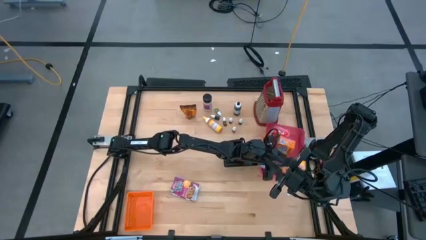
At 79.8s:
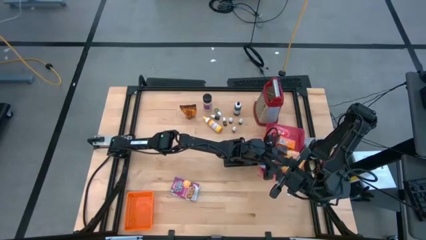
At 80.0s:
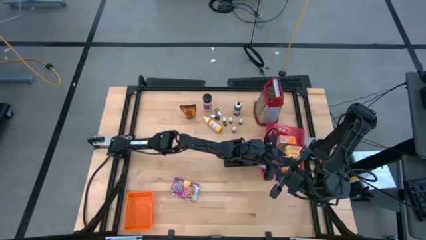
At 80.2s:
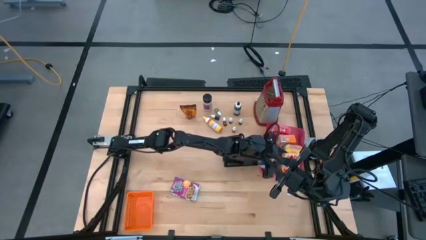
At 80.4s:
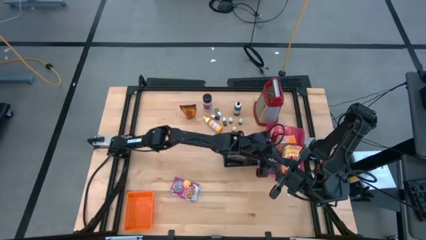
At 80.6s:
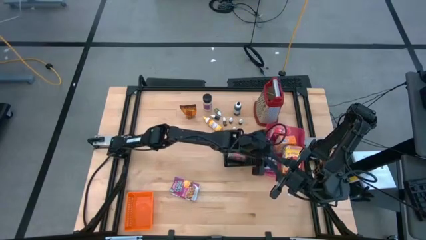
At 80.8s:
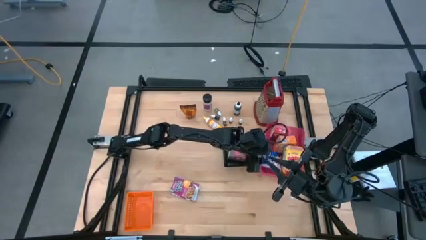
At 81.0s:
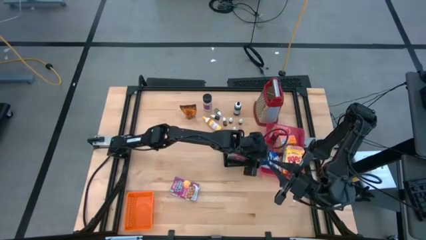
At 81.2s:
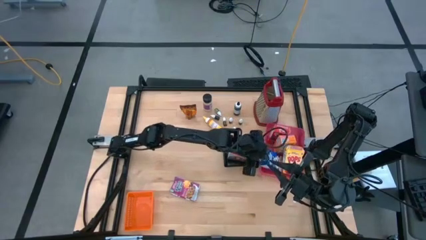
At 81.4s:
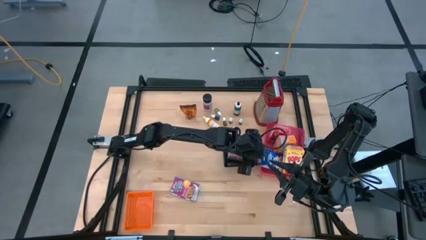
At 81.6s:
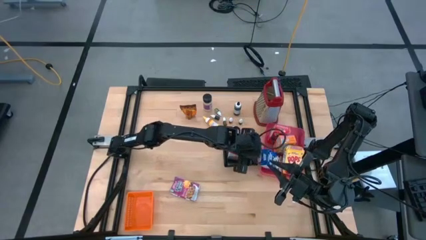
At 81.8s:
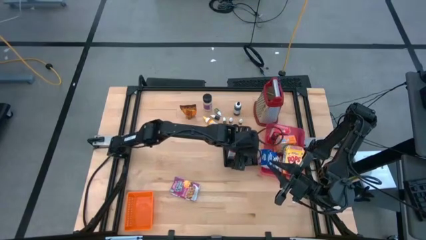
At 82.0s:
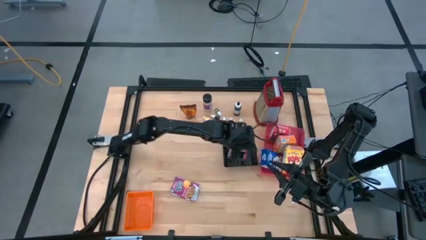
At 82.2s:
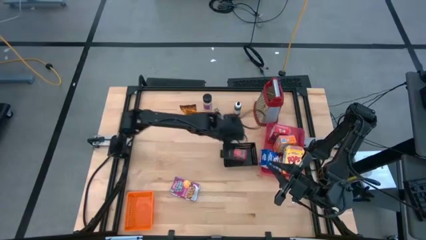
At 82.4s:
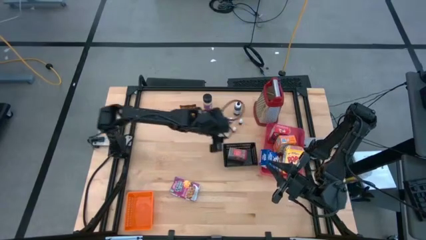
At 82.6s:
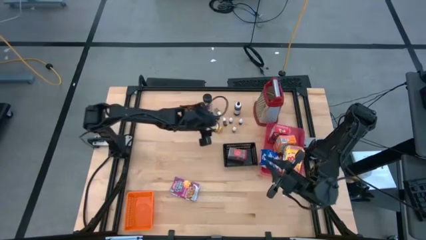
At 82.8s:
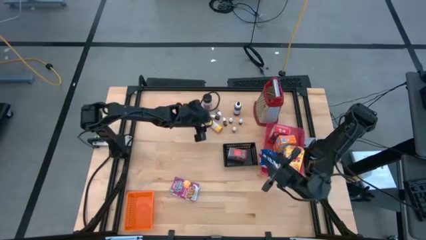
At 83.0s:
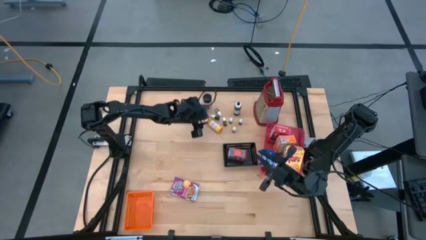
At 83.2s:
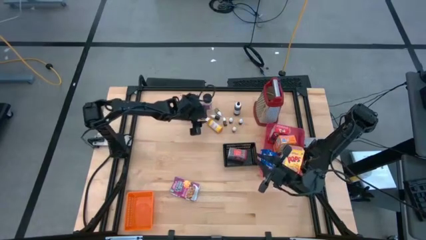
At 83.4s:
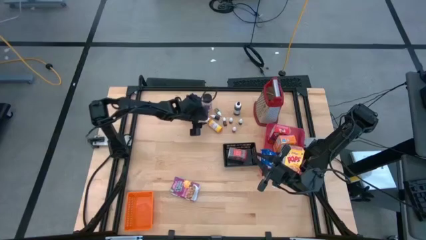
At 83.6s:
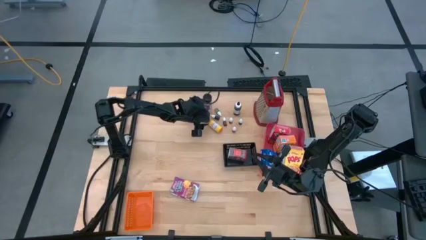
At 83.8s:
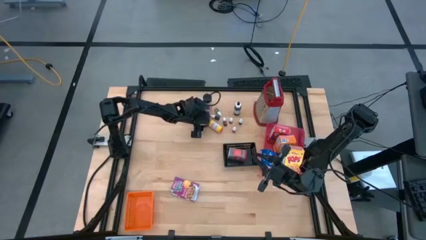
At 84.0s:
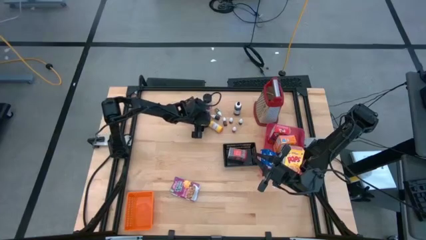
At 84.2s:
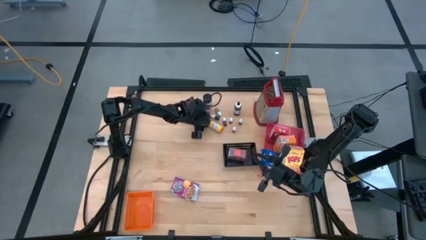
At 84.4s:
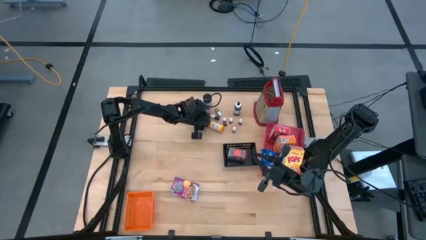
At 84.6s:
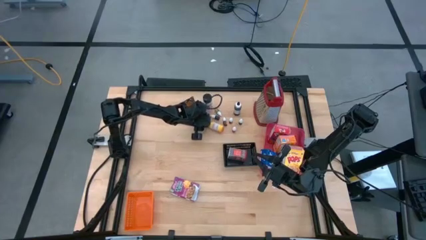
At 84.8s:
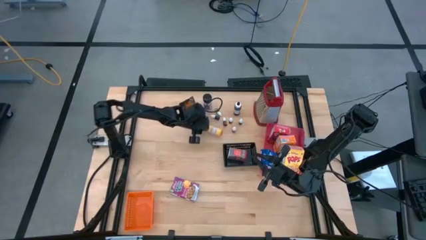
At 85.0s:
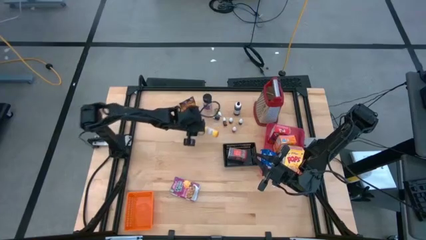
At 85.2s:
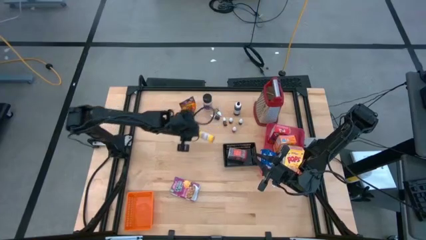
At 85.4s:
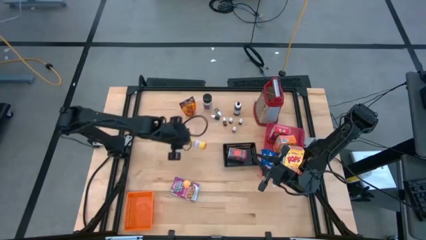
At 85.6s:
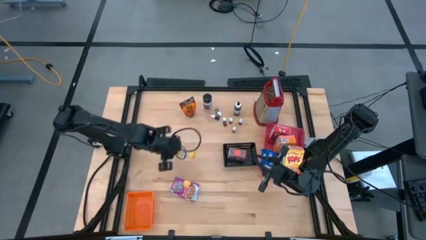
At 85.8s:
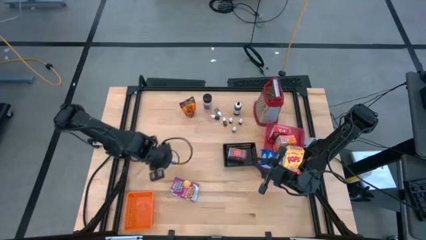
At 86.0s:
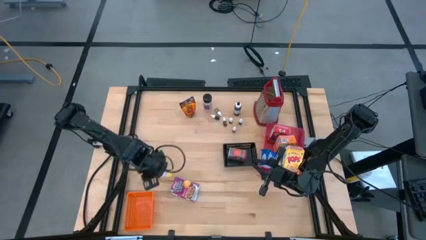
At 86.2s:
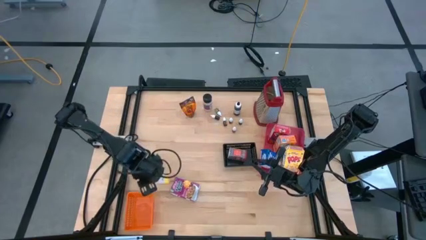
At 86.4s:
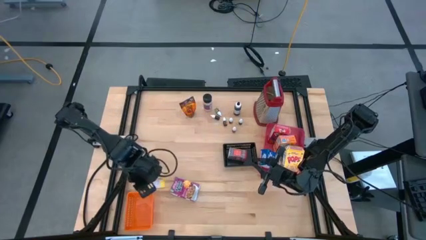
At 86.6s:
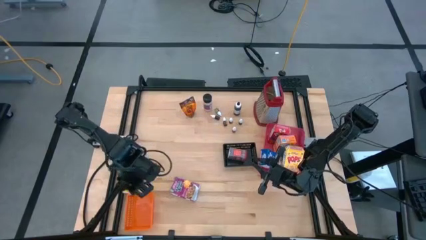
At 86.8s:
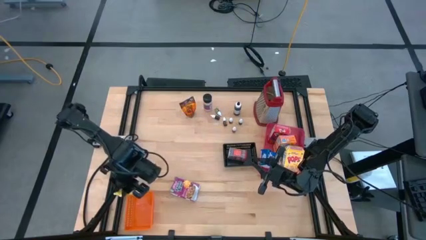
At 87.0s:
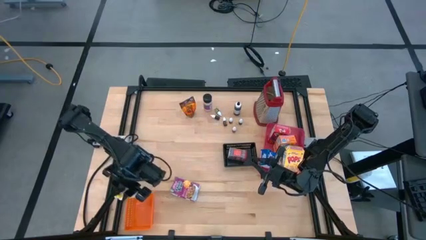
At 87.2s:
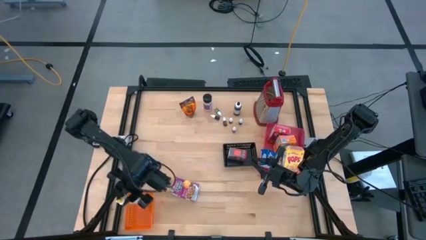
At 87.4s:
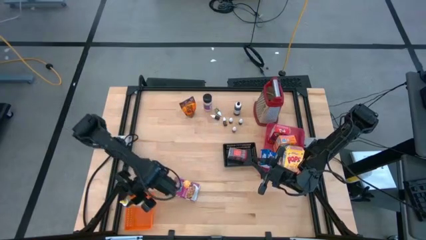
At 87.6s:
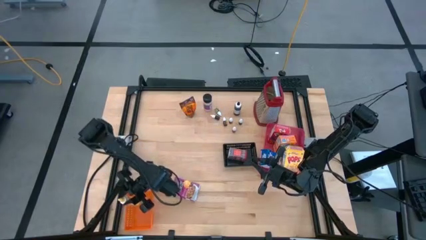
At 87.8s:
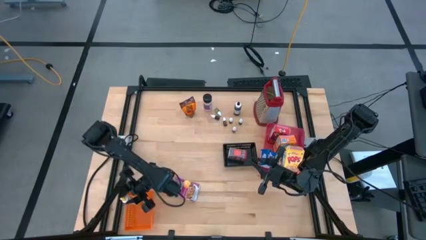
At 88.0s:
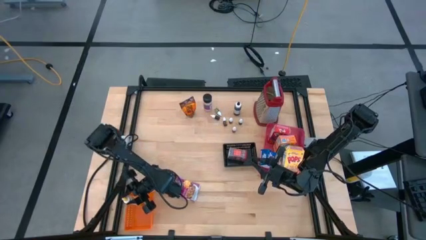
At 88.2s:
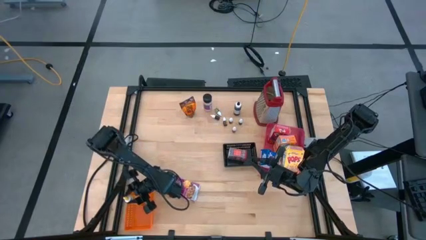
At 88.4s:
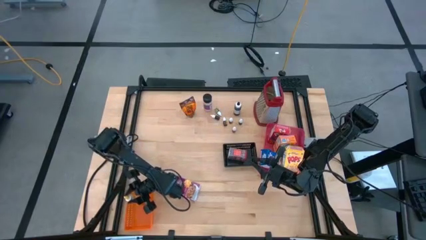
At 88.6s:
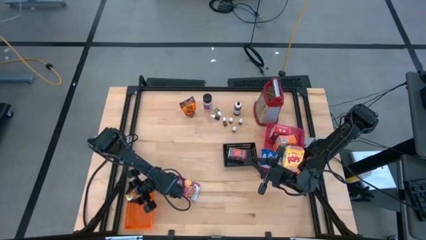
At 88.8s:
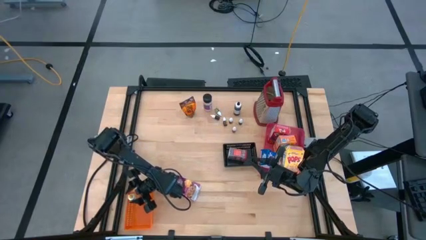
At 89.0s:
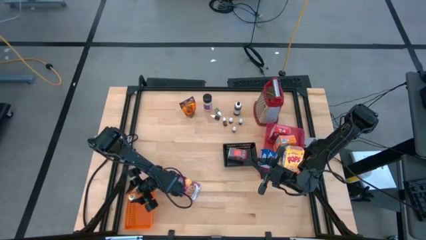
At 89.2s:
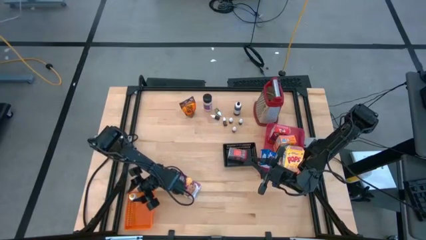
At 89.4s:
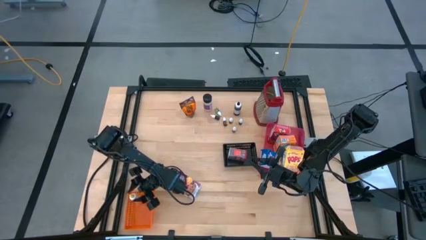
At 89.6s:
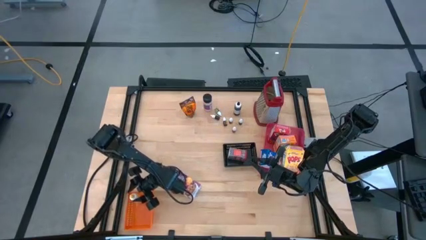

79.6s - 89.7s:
Task: Pick & Place Kitchen Items
Put the large yellow food coloring bottle into the orange bin

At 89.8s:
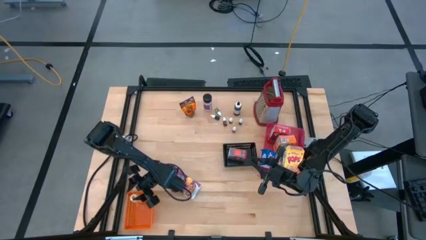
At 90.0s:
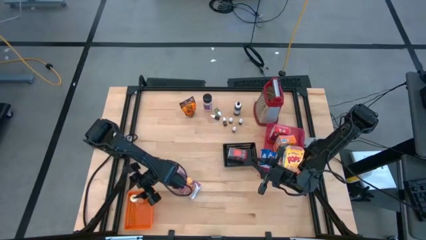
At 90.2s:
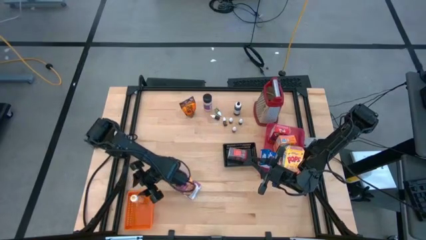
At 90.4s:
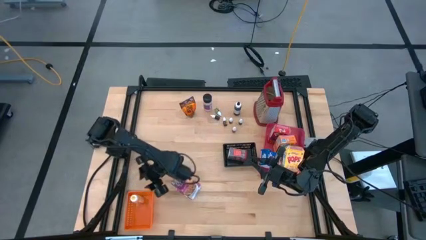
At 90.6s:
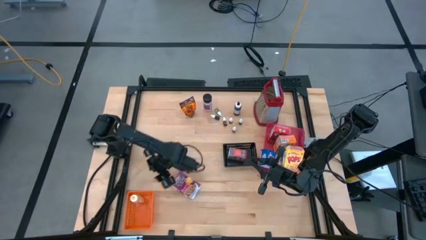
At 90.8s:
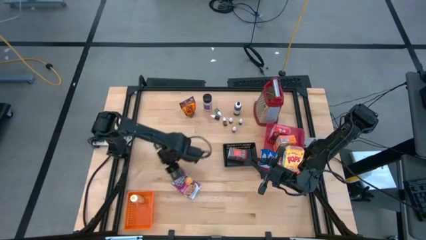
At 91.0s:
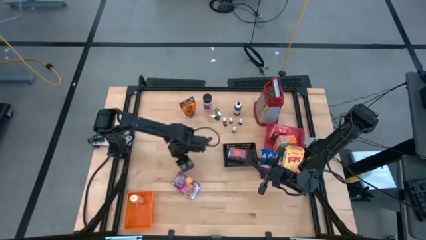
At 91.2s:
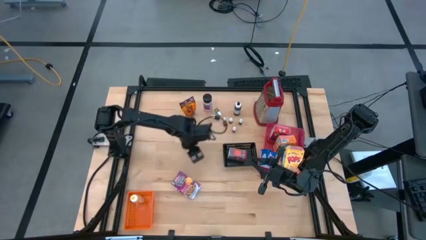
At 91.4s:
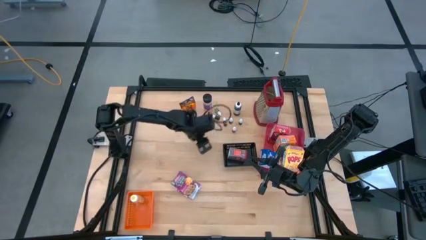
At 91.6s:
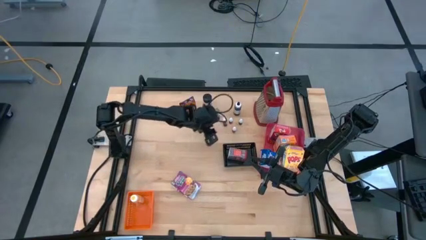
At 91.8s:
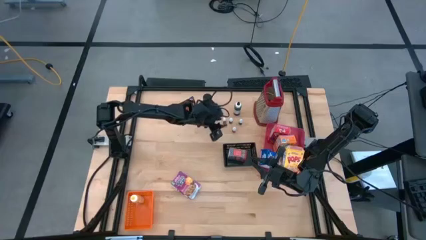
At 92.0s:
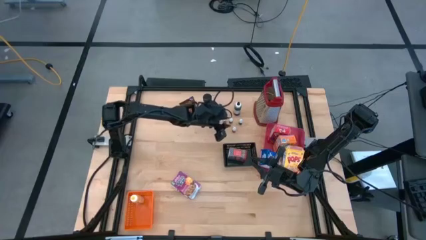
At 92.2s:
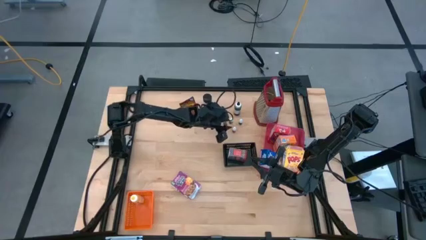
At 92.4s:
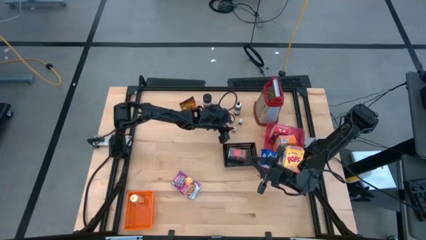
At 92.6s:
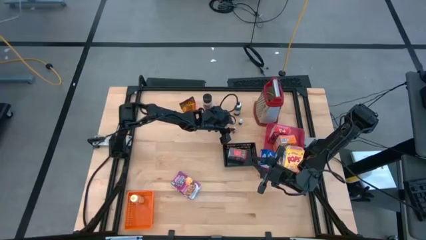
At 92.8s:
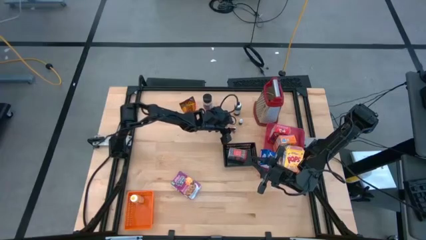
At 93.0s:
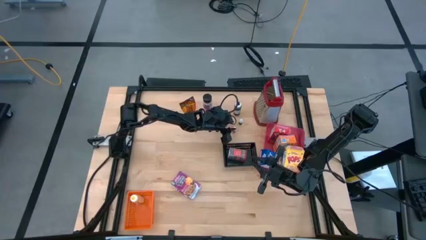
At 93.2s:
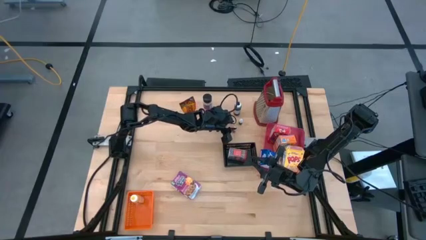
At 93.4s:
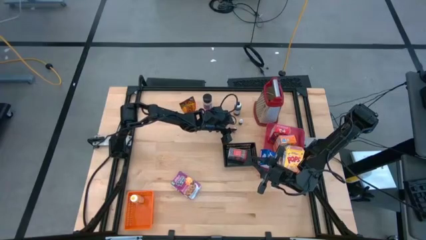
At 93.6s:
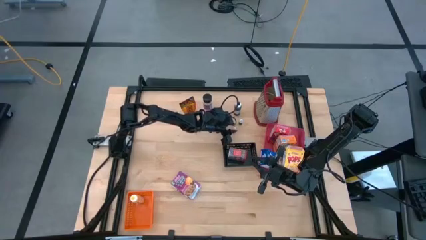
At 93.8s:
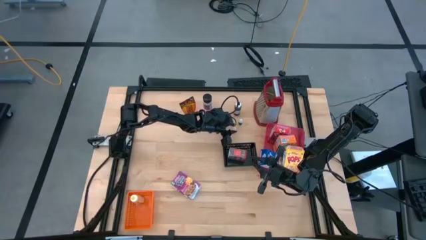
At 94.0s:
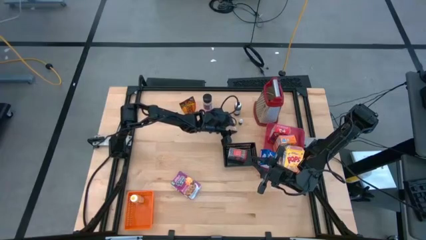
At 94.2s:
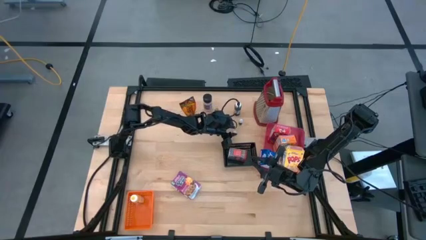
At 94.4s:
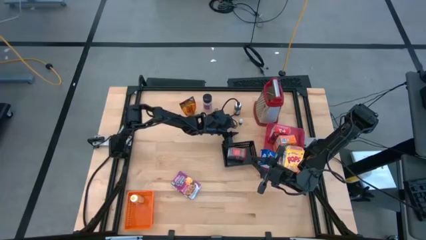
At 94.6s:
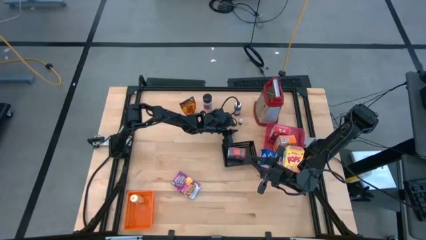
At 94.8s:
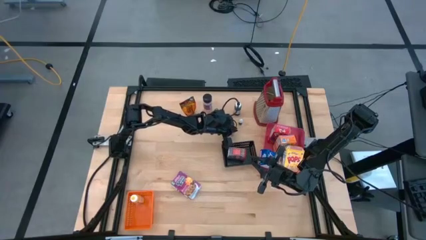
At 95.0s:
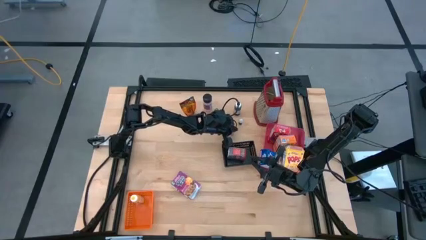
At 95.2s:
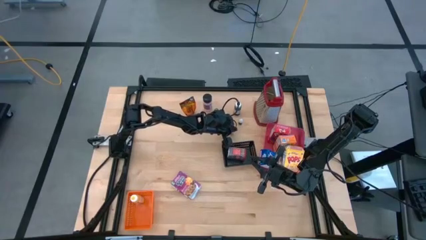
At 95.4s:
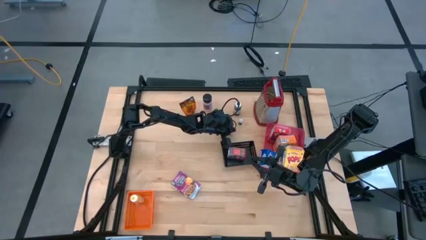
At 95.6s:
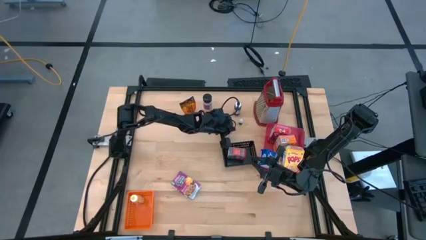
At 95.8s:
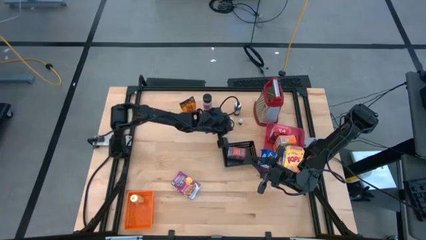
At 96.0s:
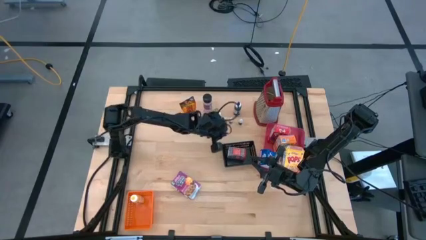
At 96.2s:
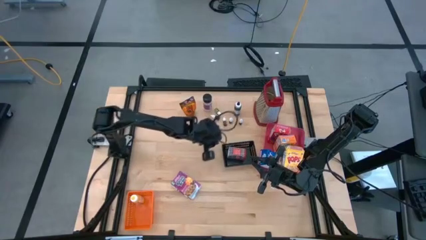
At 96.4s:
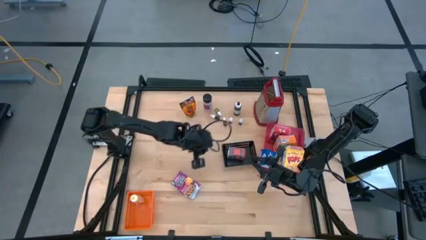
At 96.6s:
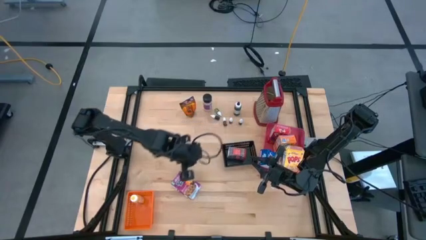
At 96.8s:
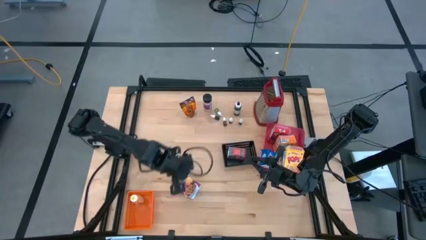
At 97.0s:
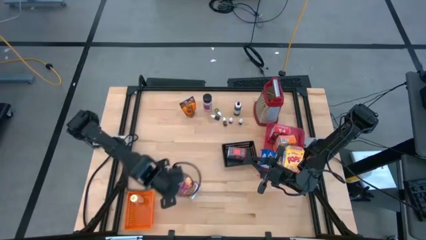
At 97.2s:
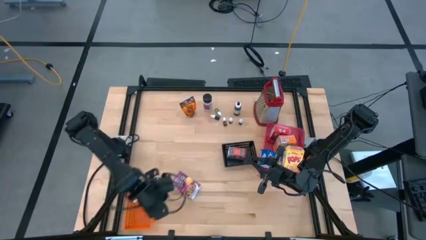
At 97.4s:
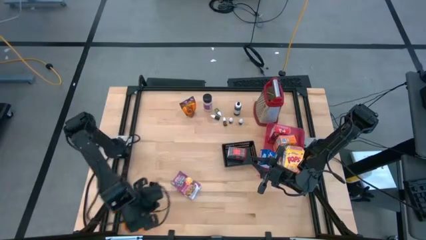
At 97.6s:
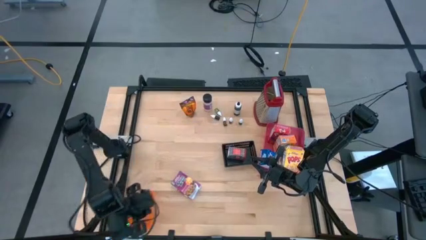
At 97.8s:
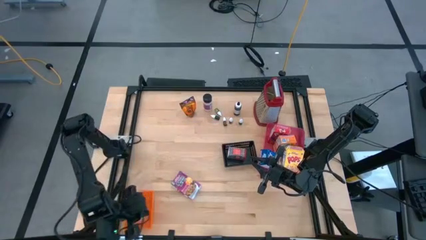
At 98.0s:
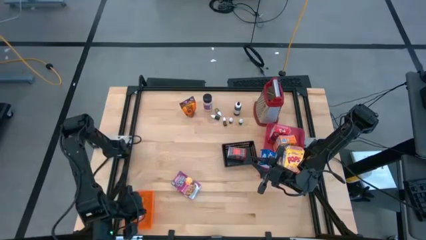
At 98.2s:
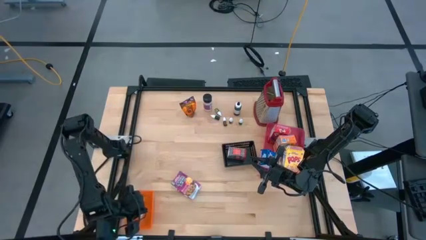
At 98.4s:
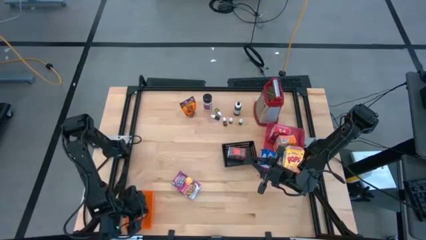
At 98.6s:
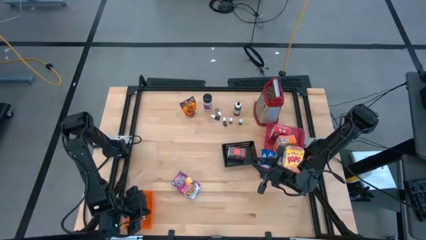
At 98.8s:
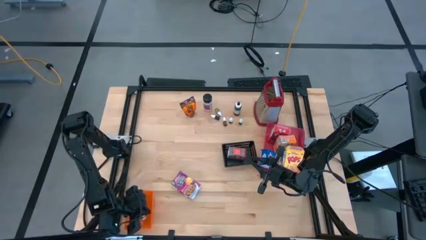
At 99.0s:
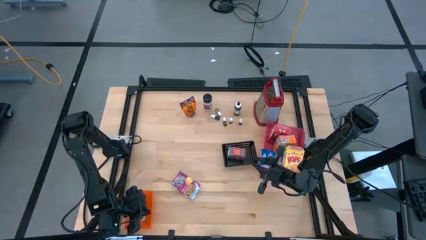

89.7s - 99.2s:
Put the small red food coloring bottle into the orange bin
